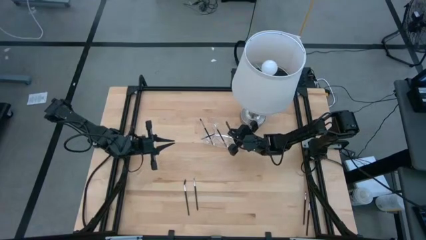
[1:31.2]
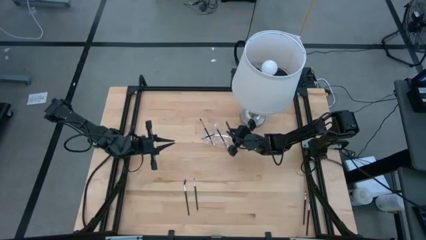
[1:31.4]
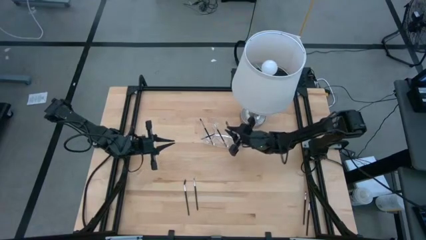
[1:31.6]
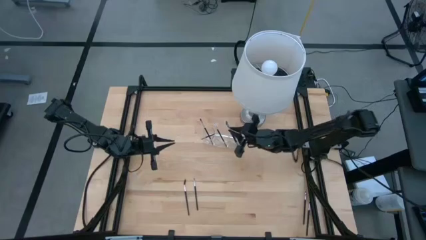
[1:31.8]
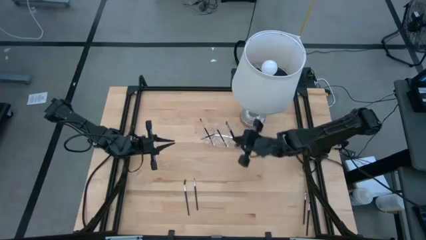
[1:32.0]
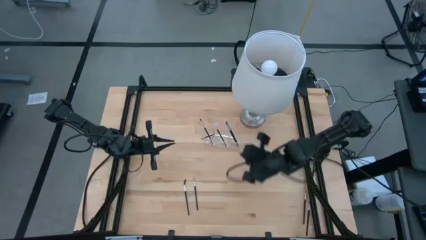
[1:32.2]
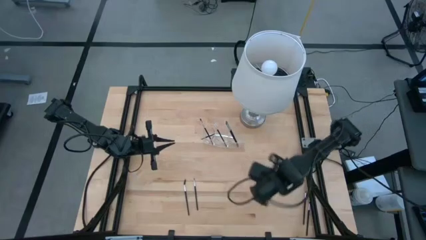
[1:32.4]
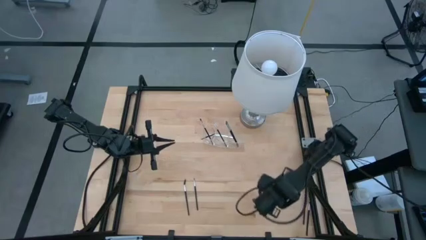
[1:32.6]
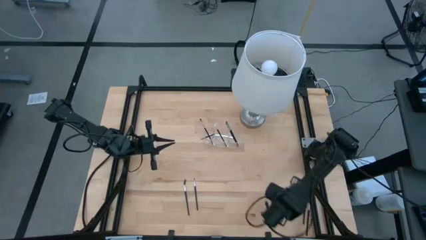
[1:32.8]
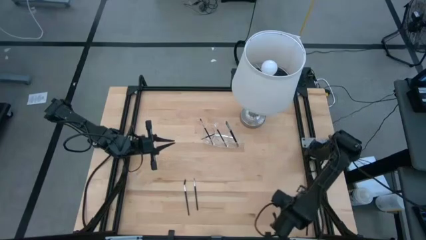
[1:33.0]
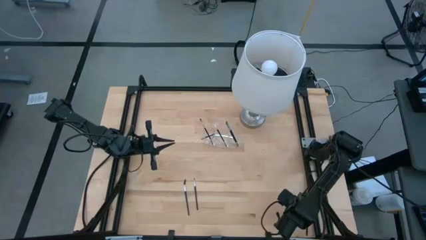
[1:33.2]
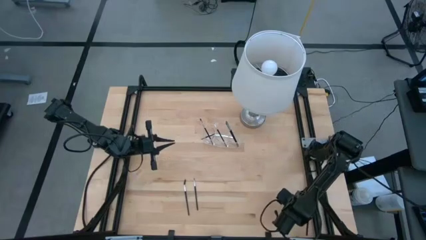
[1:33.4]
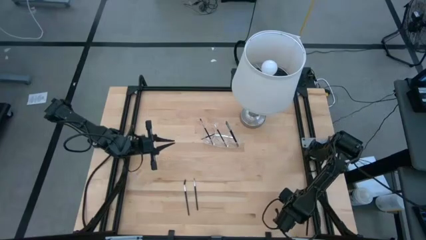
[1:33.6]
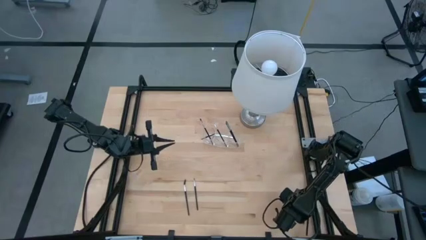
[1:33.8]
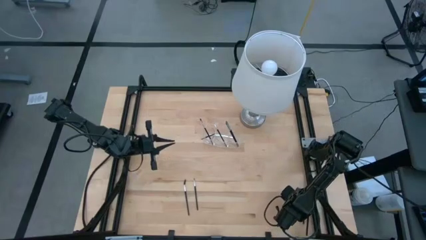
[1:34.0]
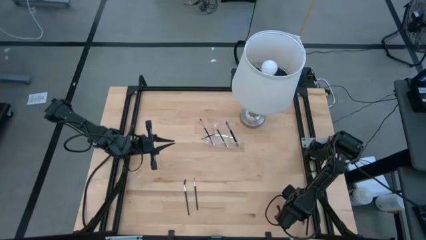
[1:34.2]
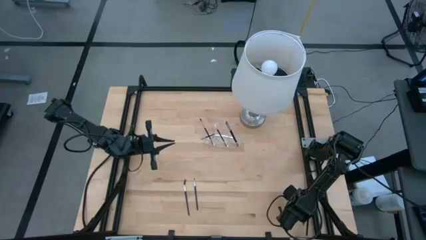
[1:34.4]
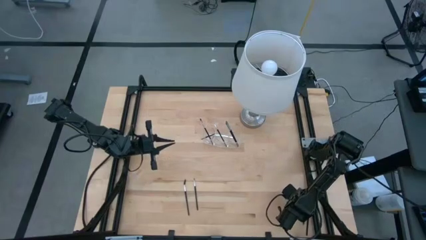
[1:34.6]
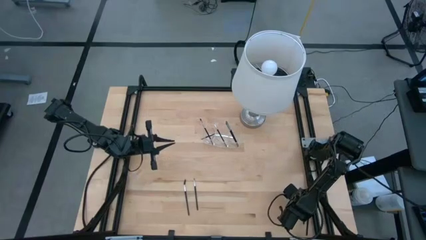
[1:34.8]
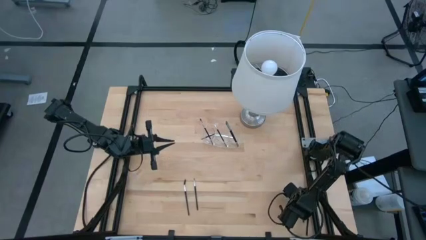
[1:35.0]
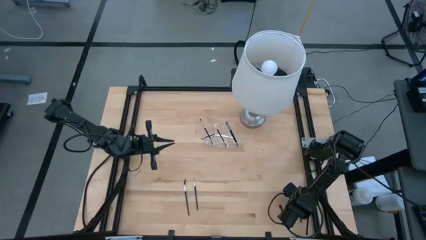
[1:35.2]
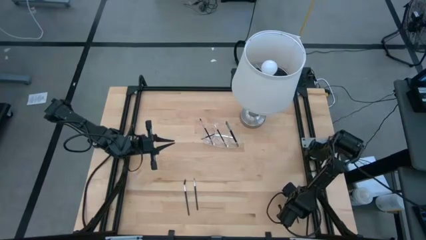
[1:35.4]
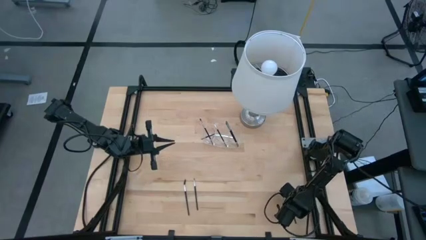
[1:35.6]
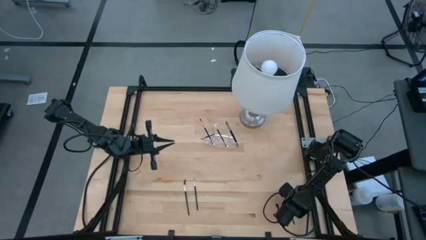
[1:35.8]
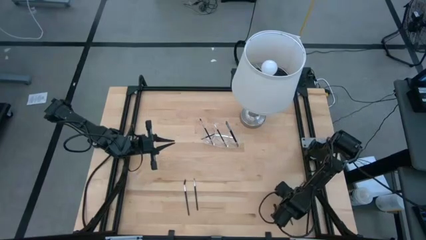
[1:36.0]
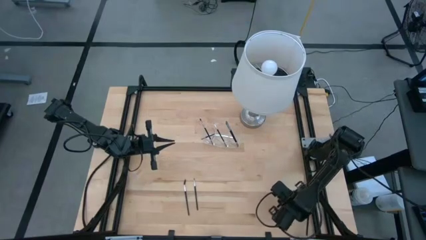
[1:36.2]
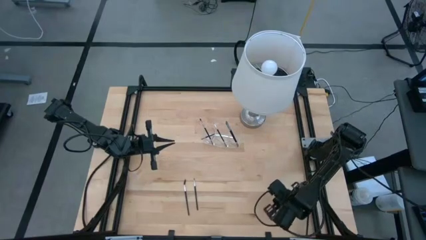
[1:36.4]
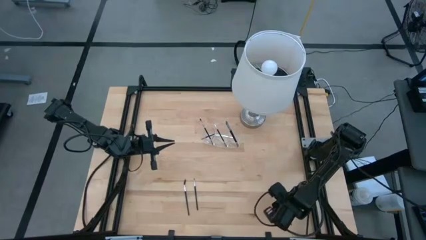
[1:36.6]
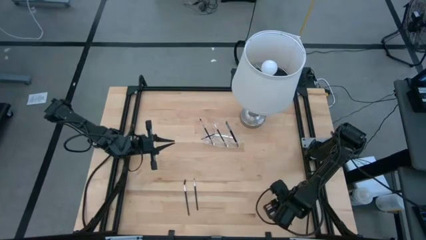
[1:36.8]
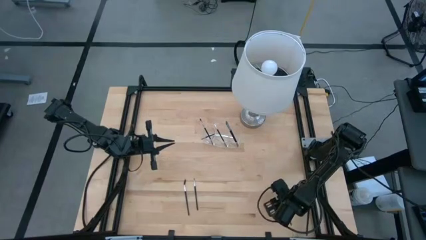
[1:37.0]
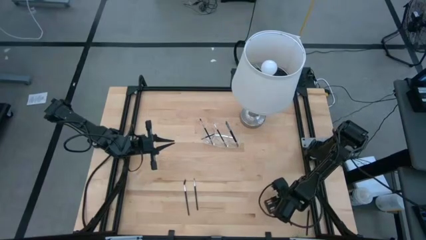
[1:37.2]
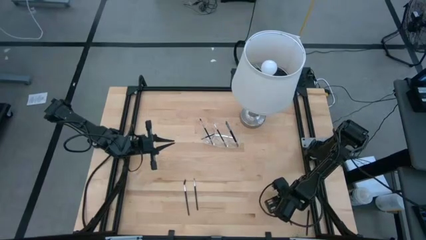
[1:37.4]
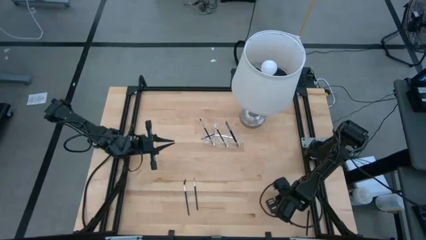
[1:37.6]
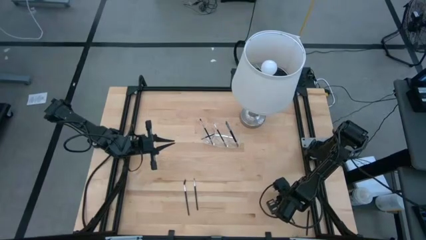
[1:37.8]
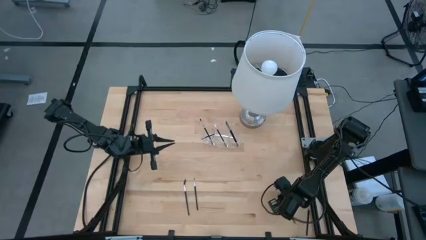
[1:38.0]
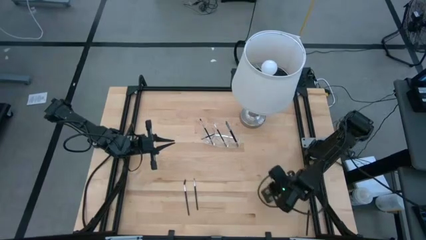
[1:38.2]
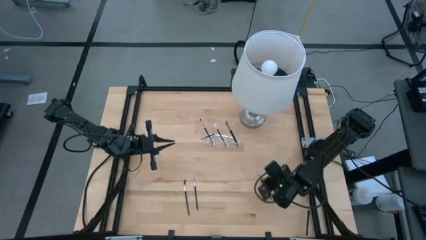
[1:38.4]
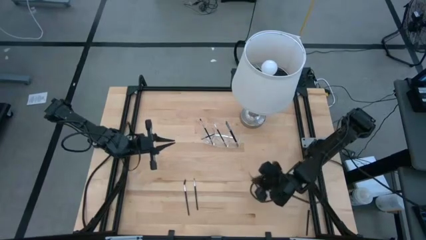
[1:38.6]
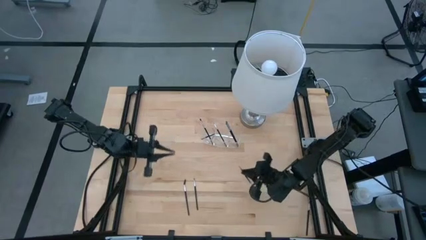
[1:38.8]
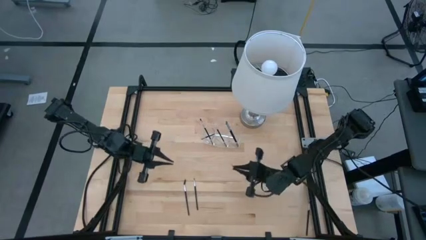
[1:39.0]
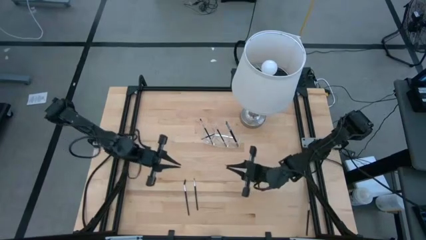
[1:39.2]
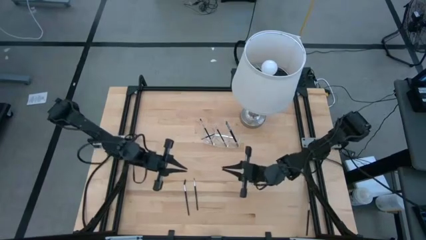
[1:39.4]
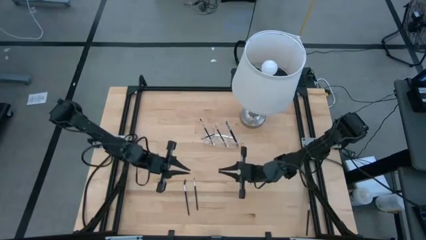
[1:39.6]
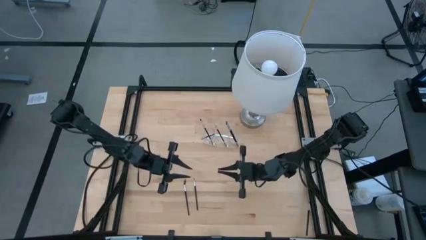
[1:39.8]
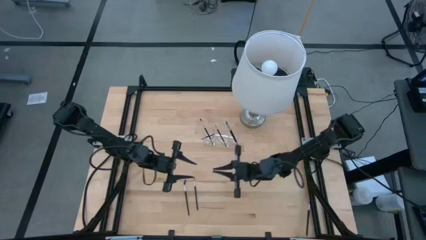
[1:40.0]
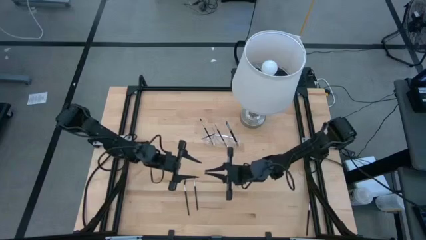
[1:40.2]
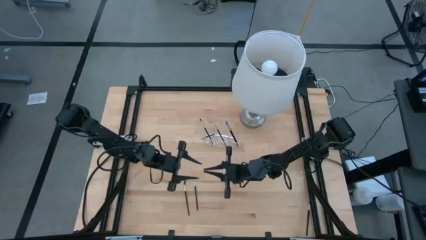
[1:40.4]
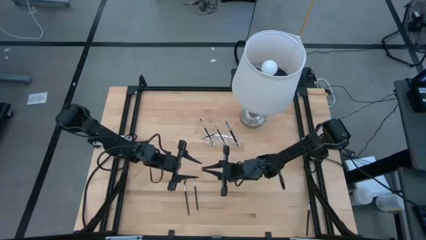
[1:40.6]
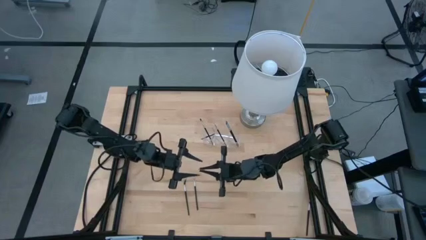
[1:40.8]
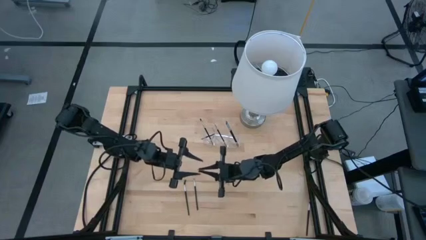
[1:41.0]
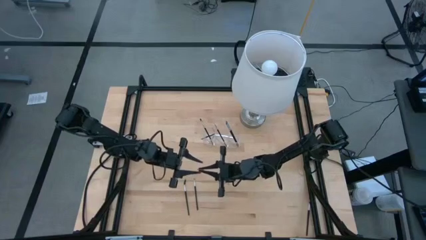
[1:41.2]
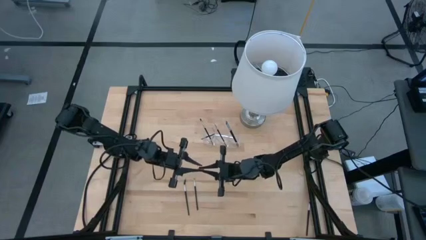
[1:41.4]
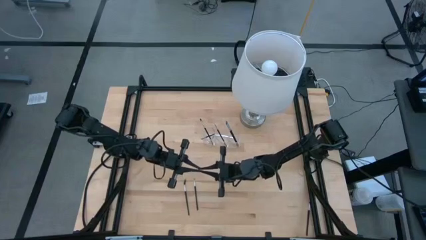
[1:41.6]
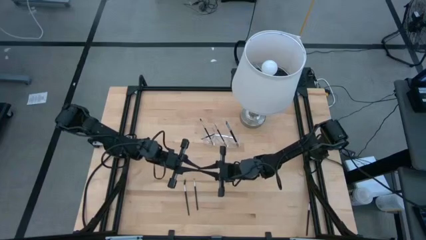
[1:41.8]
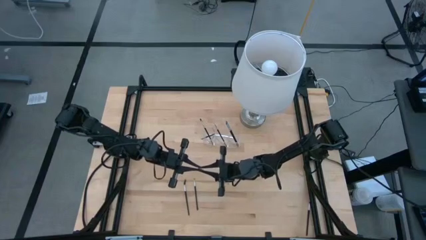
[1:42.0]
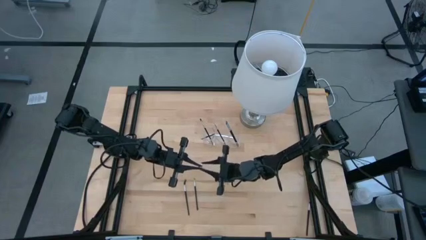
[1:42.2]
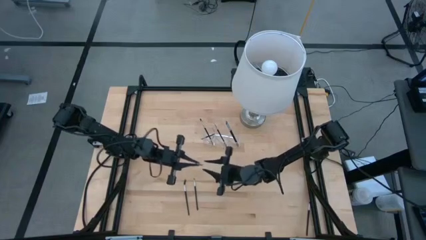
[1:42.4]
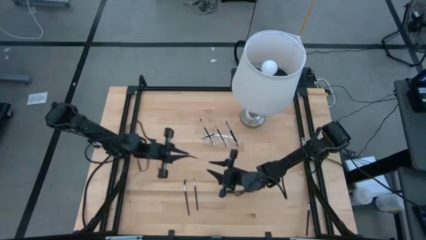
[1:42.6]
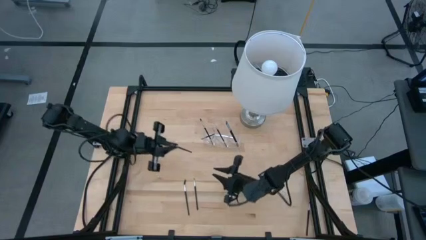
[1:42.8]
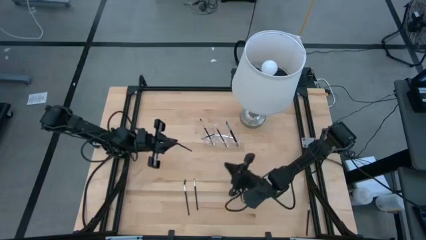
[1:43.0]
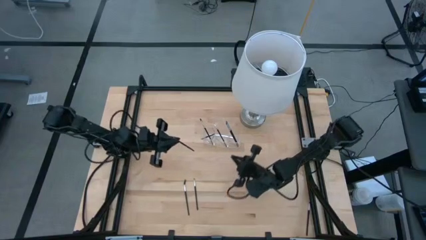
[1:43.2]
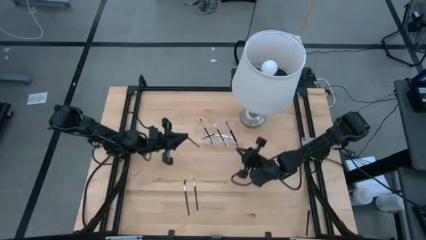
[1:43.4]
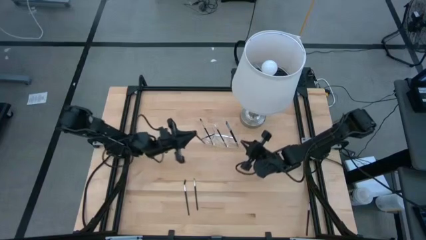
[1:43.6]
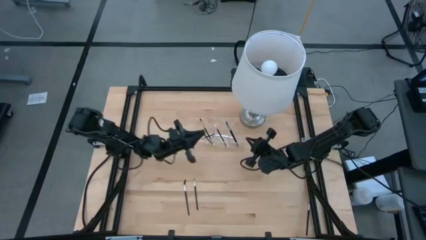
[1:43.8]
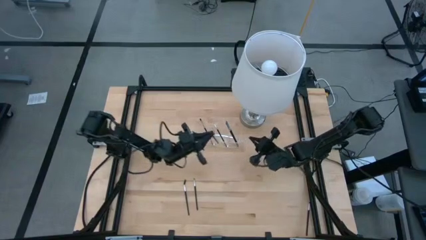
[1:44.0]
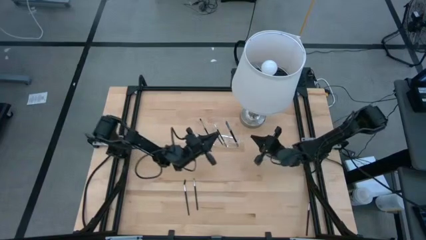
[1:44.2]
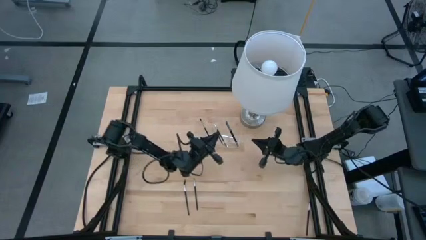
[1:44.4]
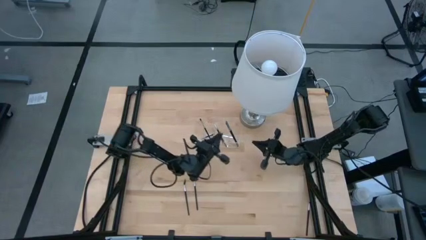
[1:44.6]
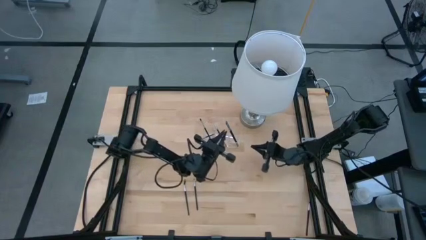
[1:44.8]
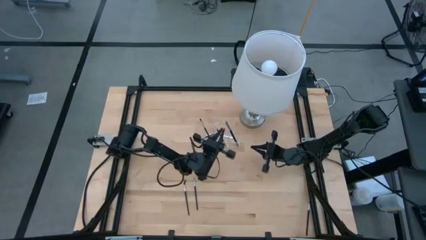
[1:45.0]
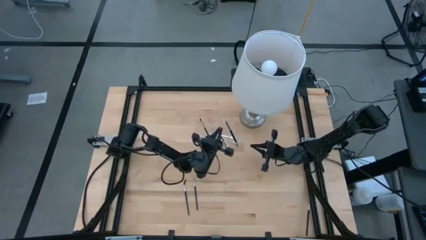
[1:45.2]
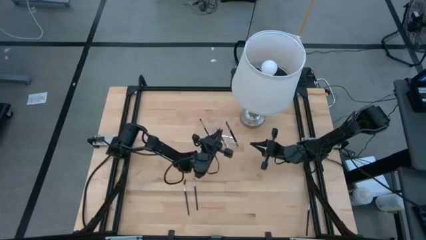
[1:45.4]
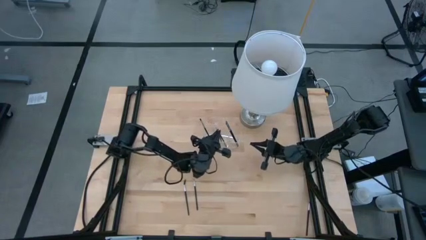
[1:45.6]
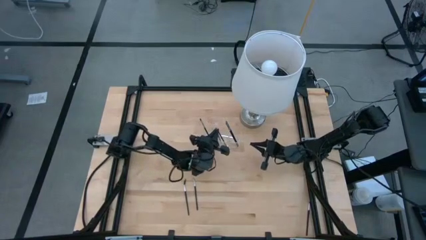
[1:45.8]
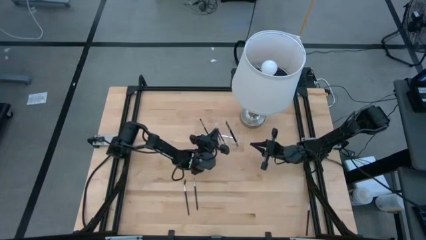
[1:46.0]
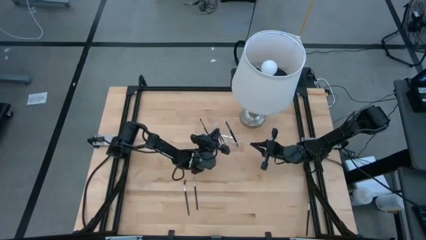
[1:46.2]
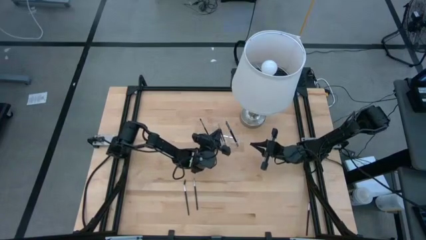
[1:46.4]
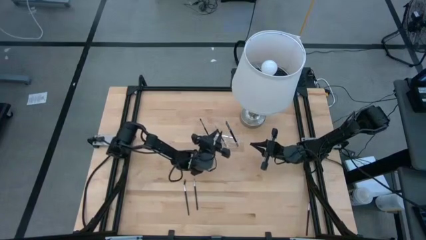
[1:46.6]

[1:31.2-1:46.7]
Task: Pick & Place Makeup Brushes
Put the black eyeshadow brush into the transparent organizer
